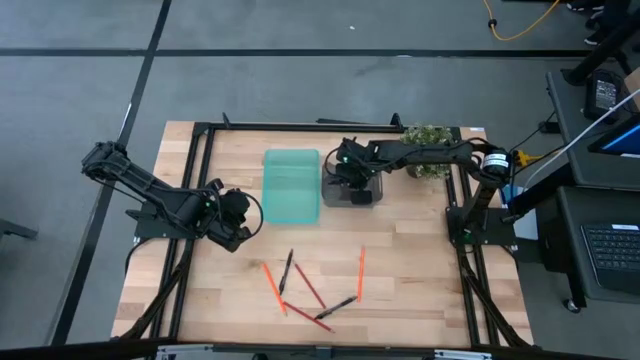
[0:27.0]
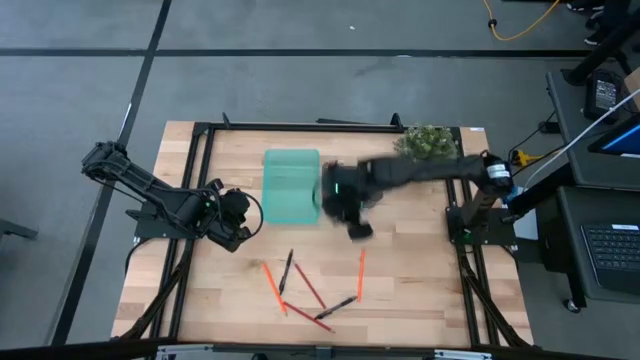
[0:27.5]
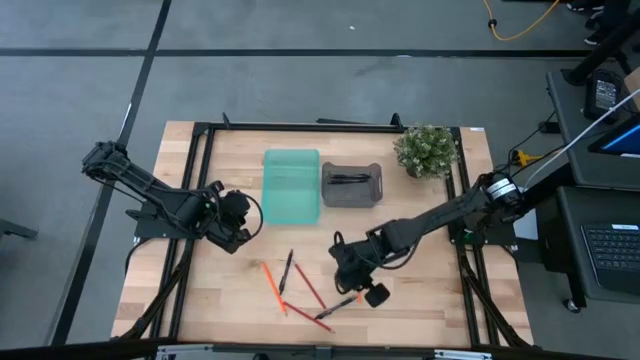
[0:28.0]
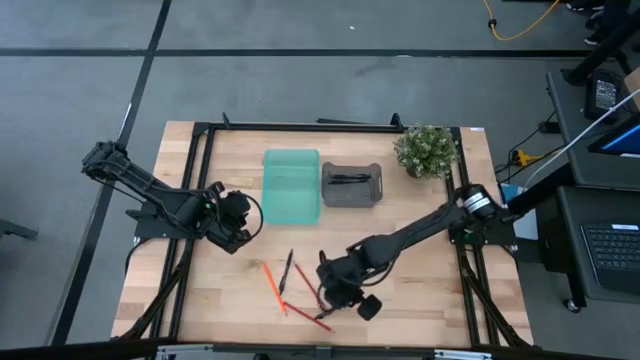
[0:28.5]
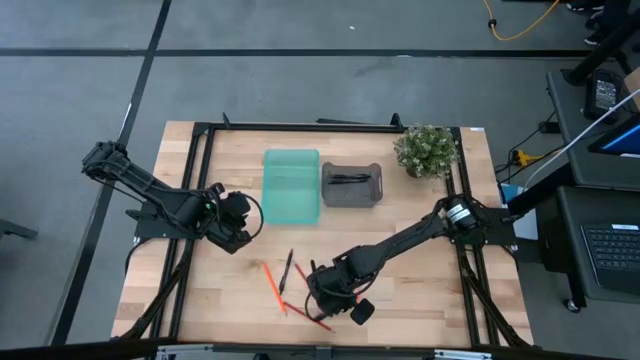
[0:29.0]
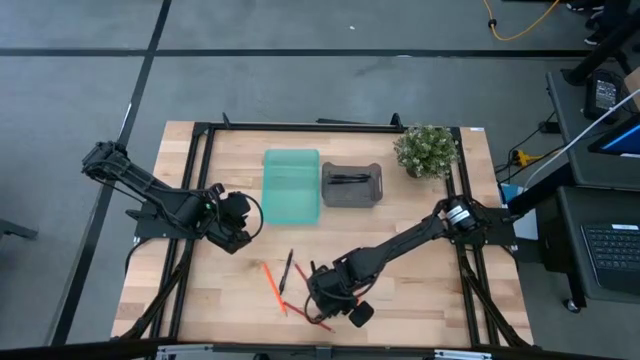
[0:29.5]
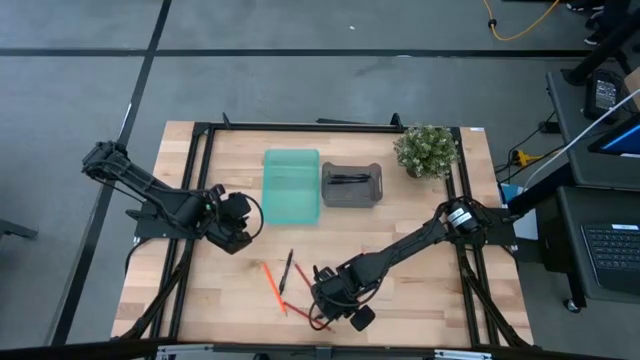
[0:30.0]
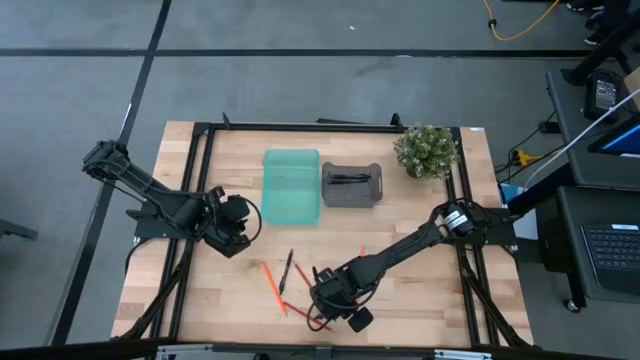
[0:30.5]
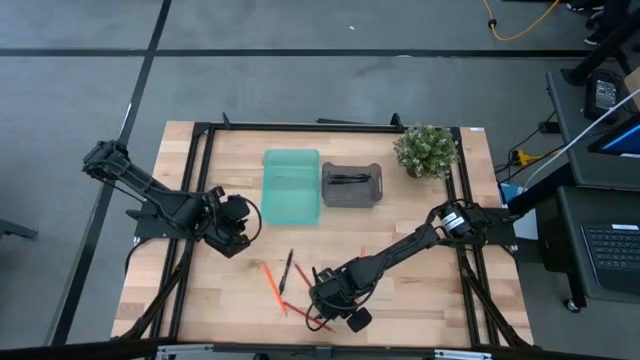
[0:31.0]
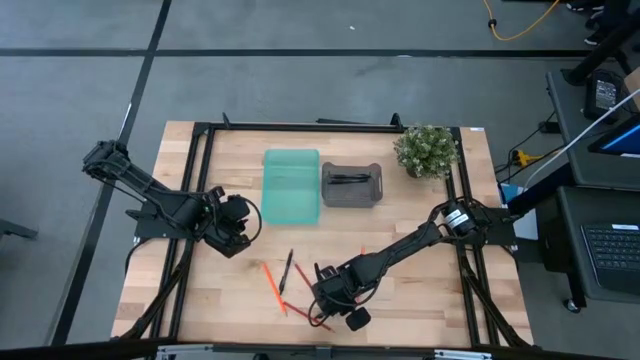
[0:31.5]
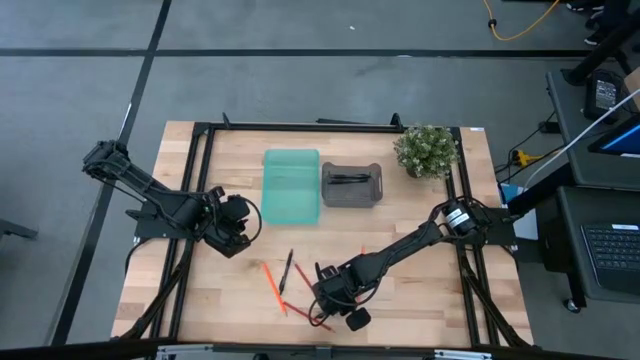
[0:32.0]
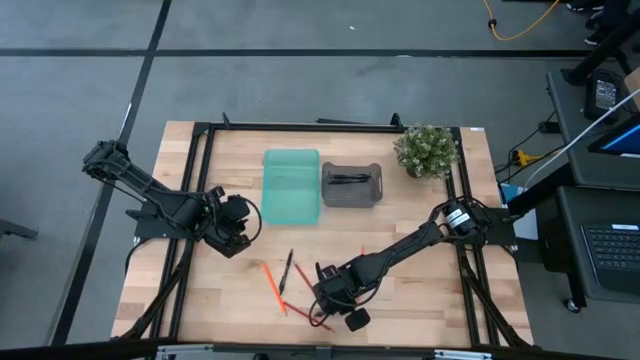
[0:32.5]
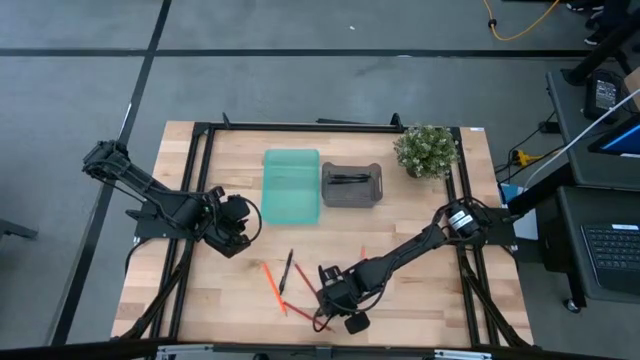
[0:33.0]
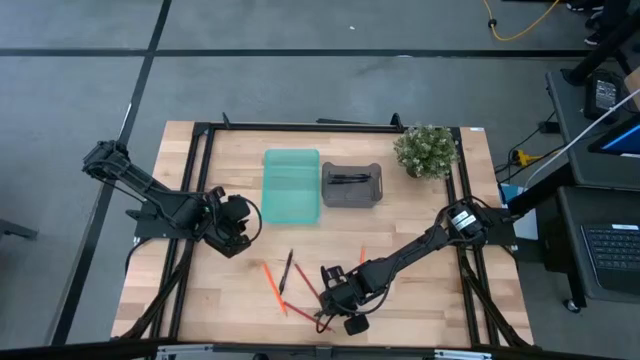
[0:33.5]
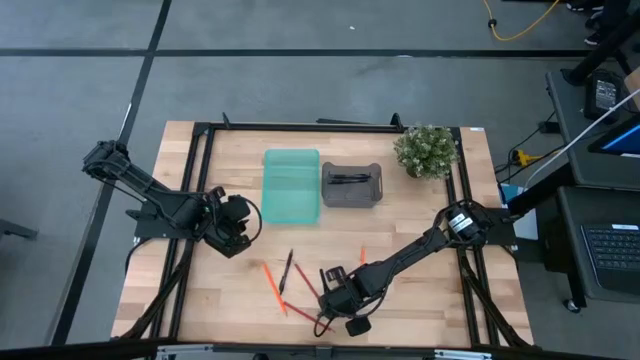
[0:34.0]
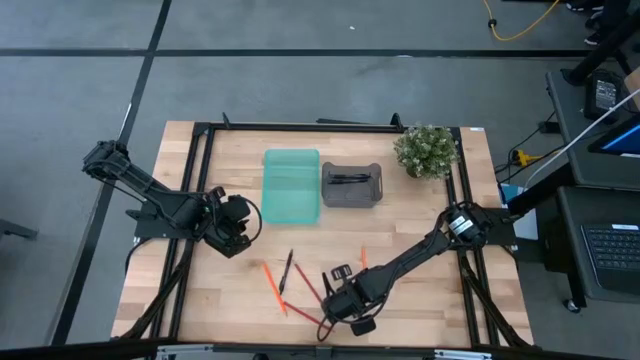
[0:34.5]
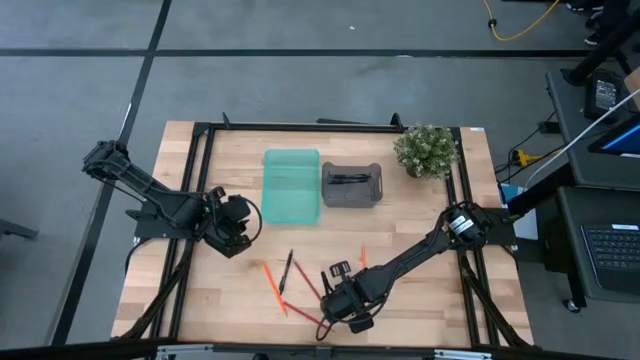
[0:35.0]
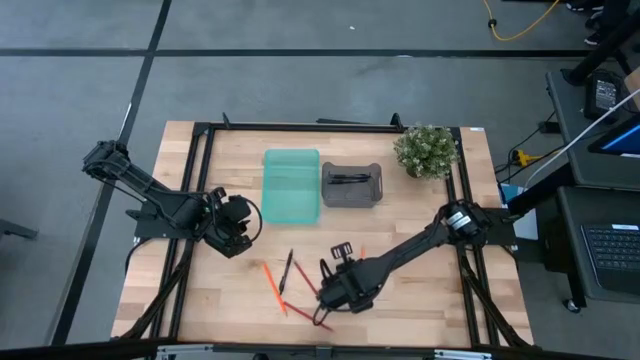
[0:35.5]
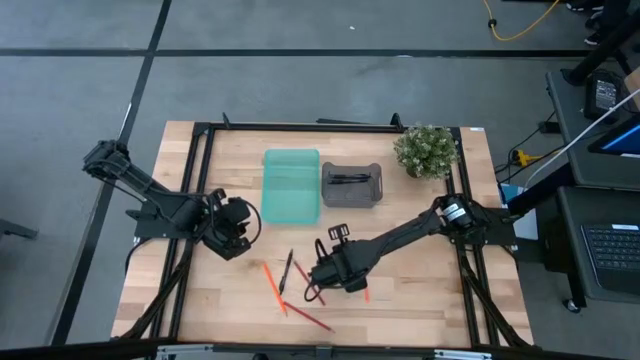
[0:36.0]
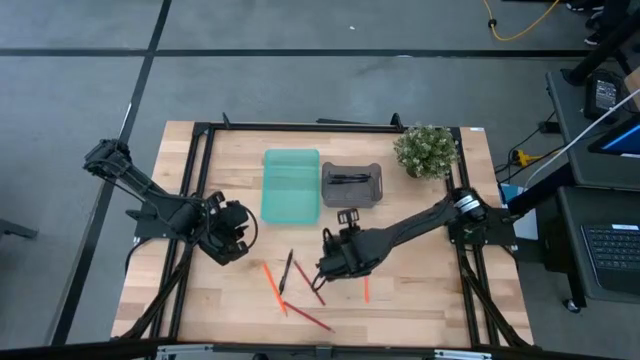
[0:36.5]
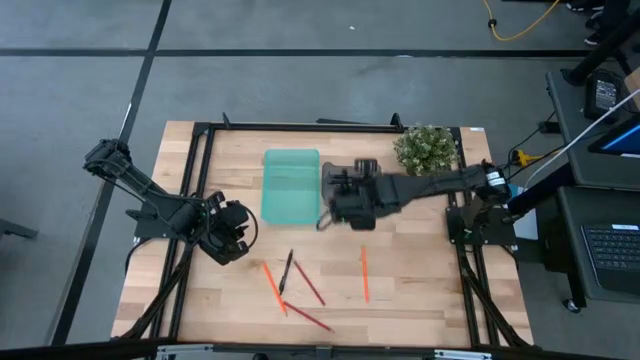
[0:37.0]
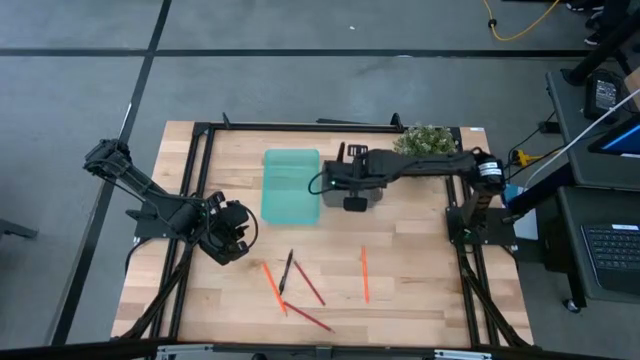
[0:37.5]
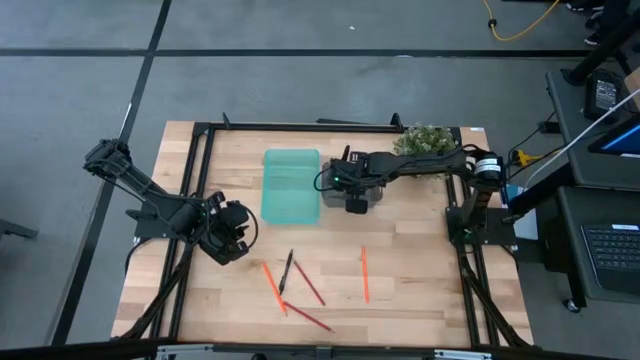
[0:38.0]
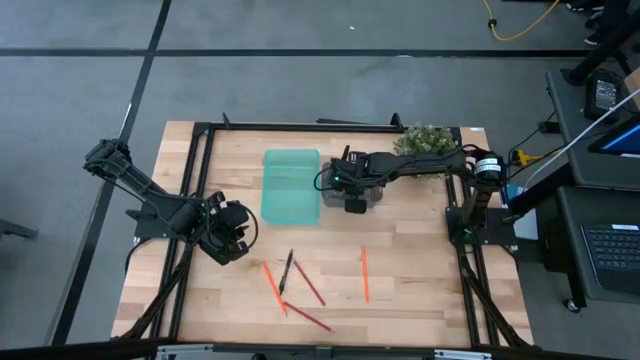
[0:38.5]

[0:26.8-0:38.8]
Task: Sort pens & pencils
Put the black pen into the black bin

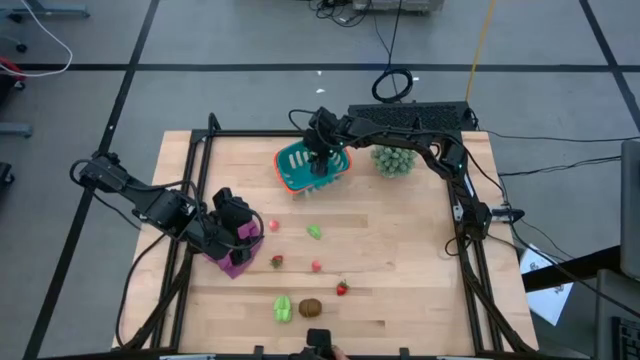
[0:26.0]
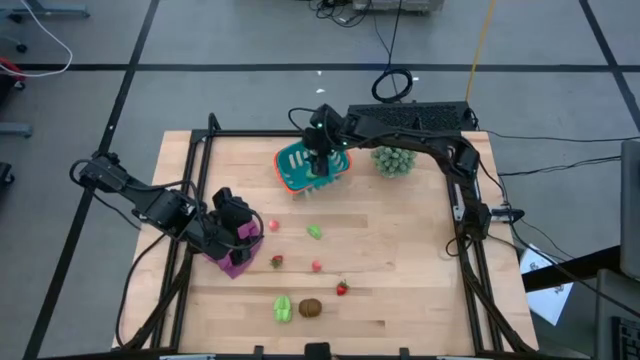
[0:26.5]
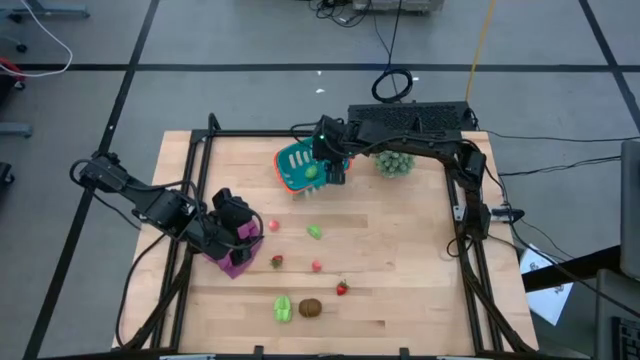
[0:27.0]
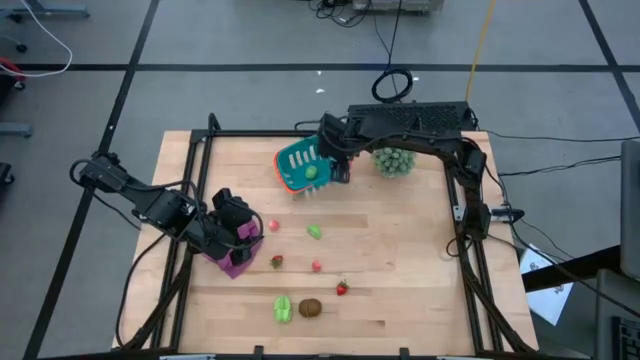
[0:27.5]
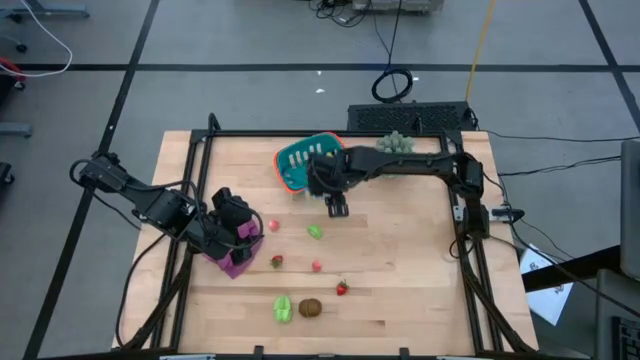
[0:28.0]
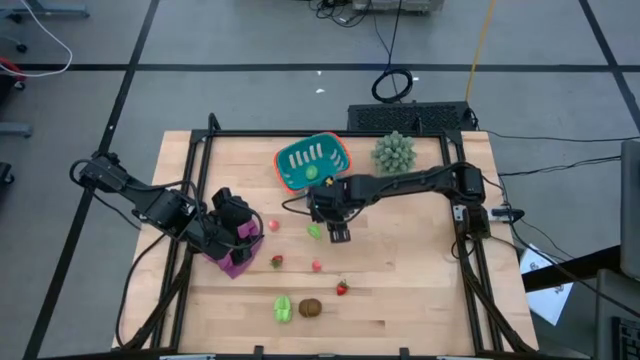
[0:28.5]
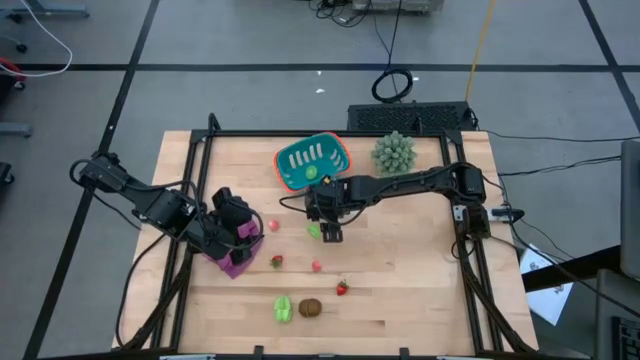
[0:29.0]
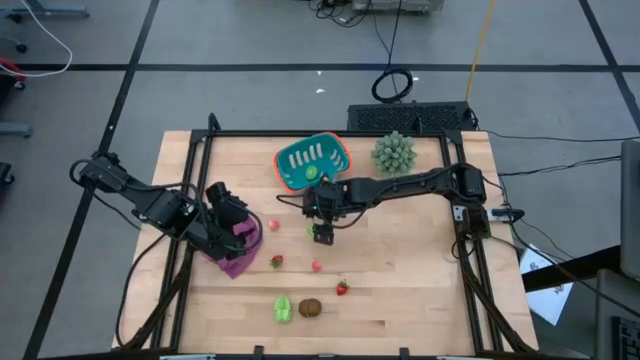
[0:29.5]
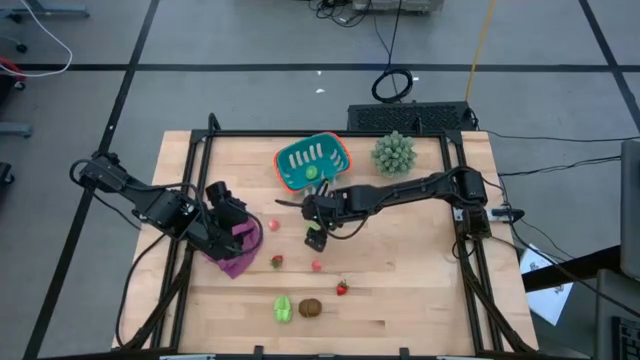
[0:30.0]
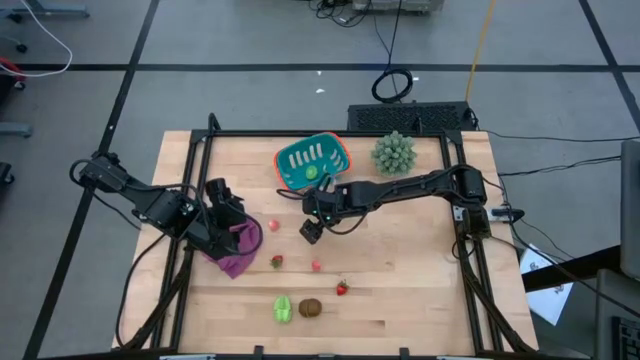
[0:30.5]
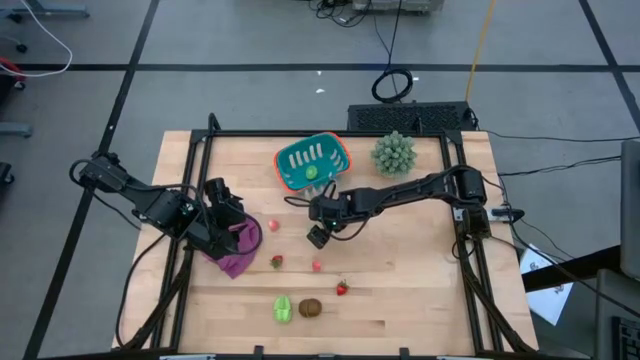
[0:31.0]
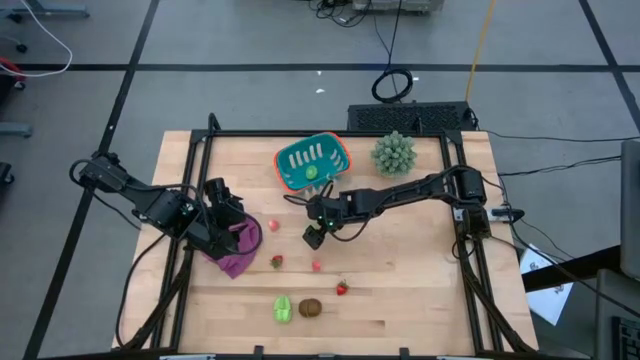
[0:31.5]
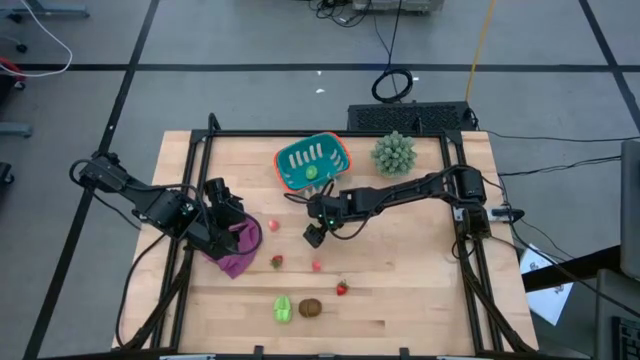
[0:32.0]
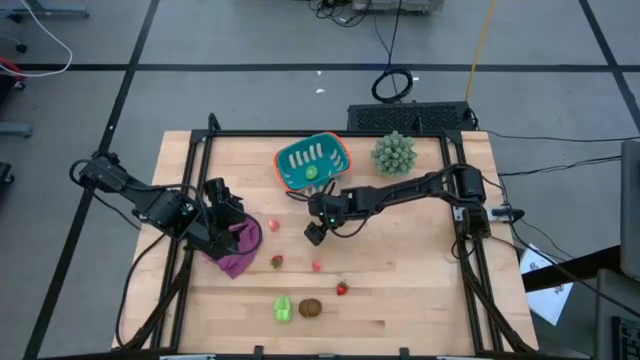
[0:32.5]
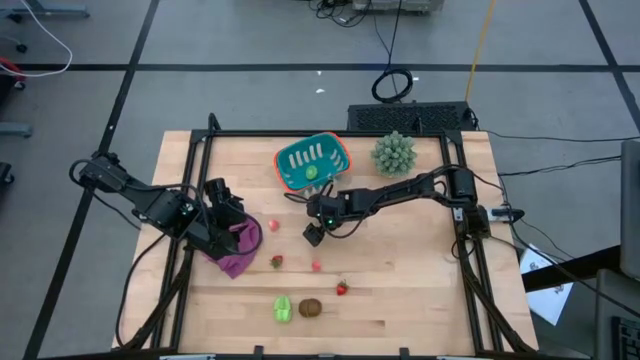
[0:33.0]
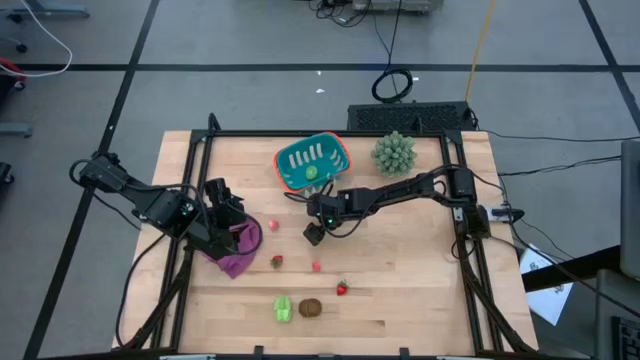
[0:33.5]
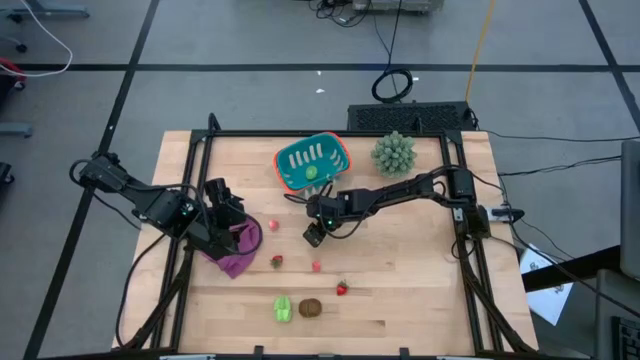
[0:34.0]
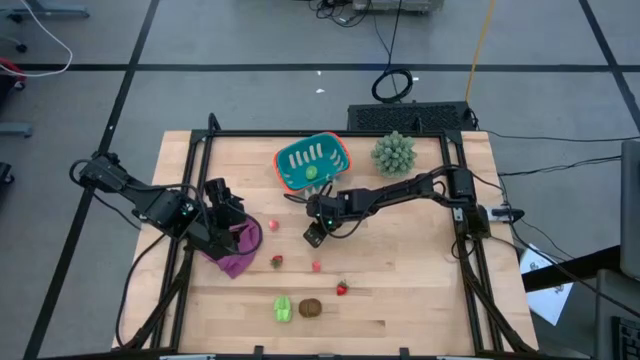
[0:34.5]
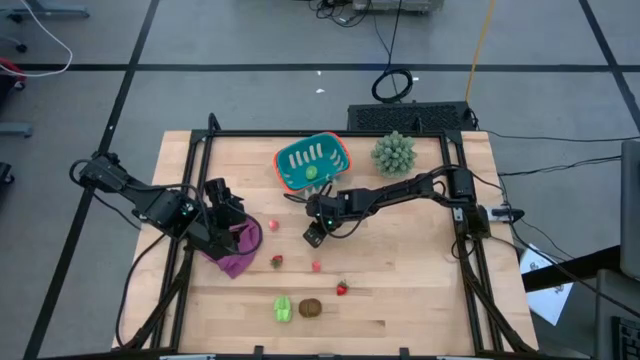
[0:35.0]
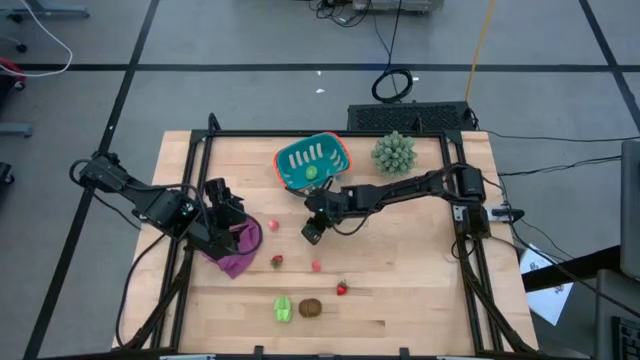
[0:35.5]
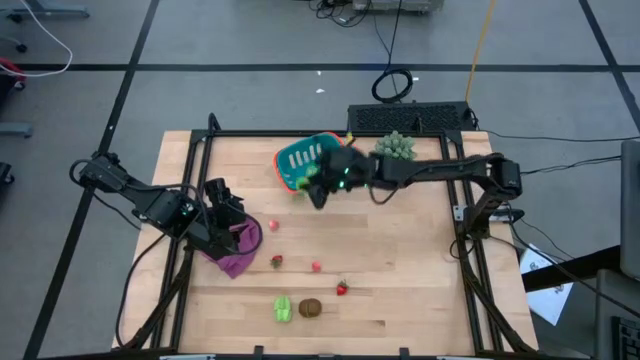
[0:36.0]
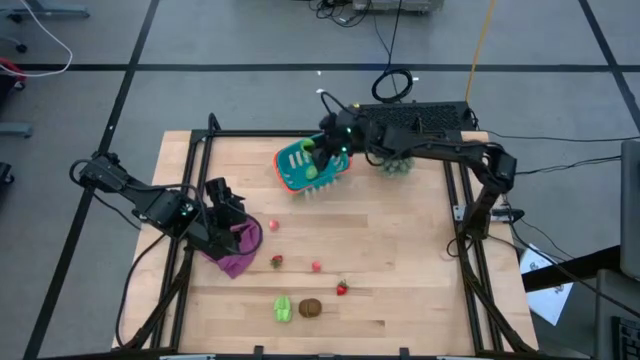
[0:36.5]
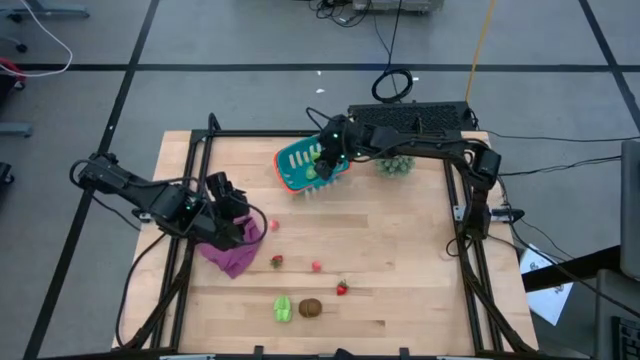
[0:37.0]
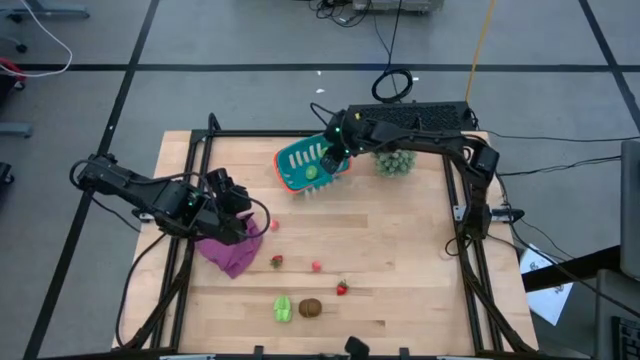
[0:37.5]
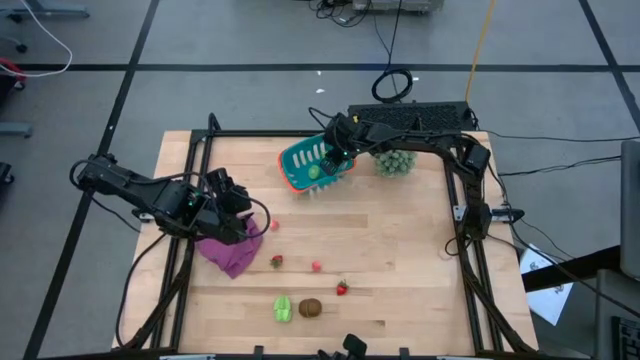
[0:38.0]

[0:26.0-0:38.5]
Task: Pick and placing Produce into tupperware
Put the cabbage half into the blue basket
